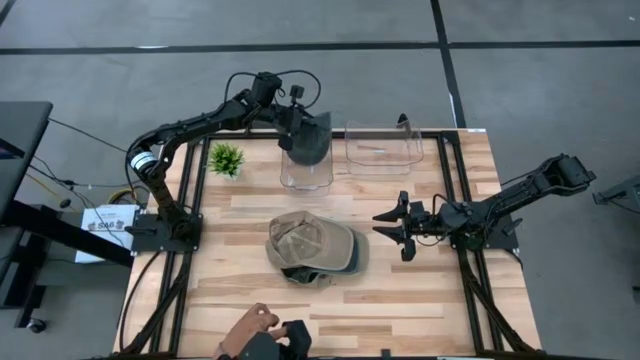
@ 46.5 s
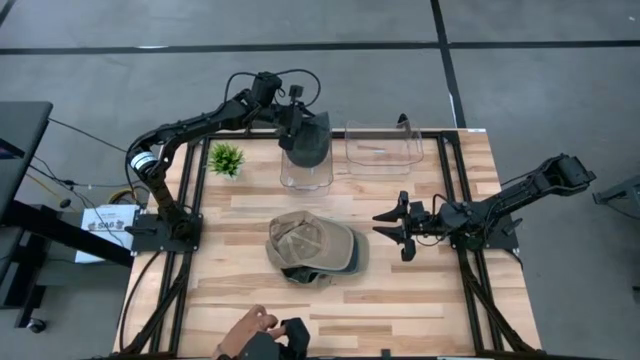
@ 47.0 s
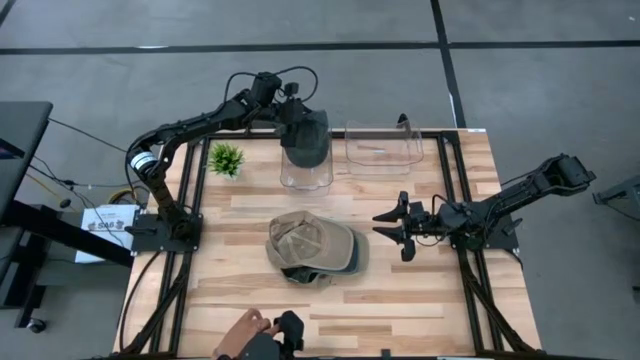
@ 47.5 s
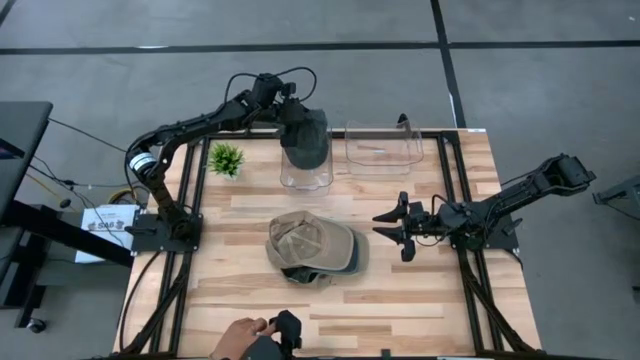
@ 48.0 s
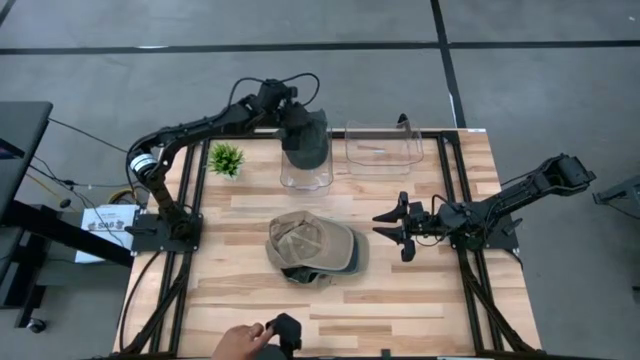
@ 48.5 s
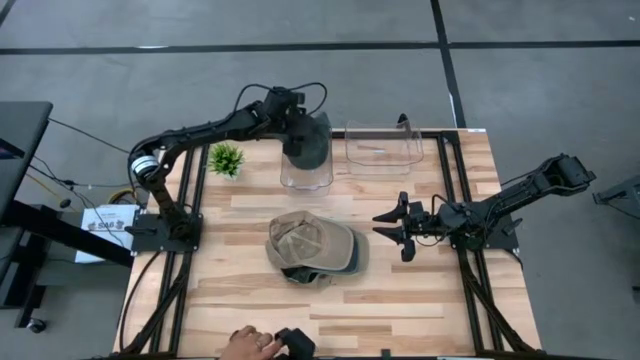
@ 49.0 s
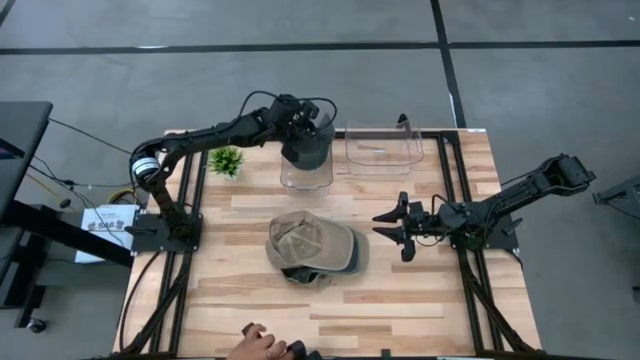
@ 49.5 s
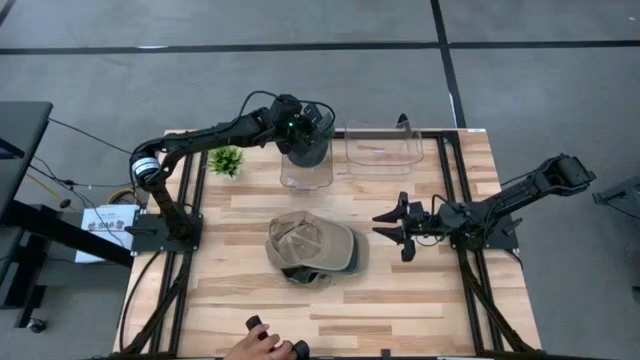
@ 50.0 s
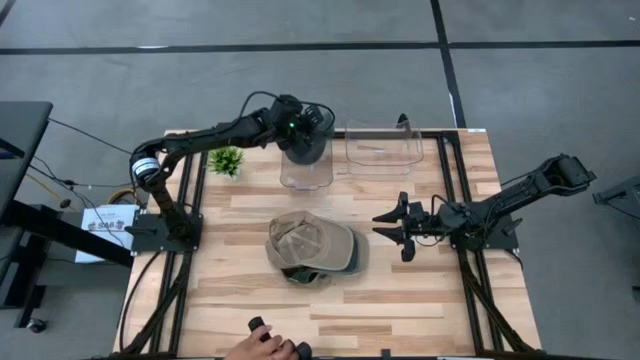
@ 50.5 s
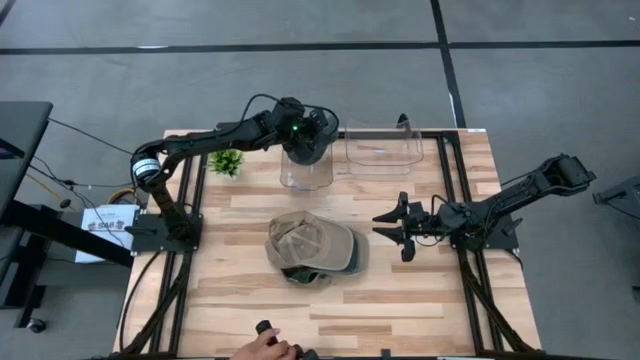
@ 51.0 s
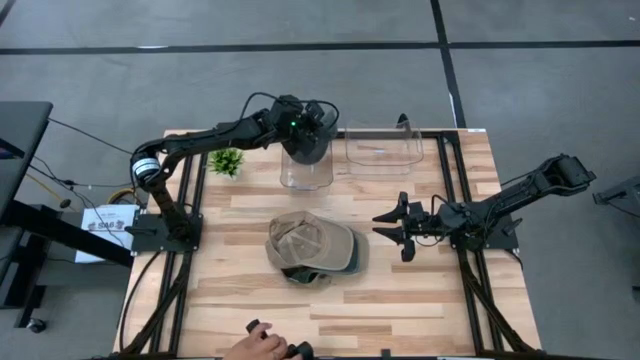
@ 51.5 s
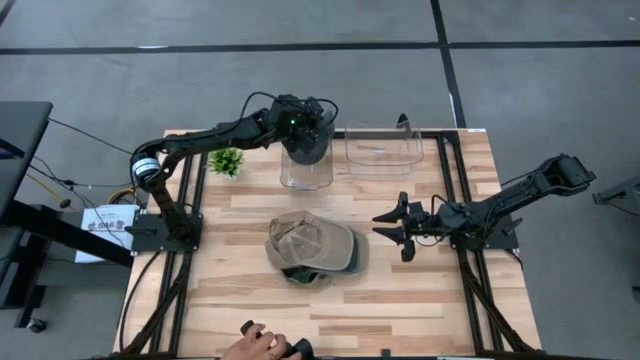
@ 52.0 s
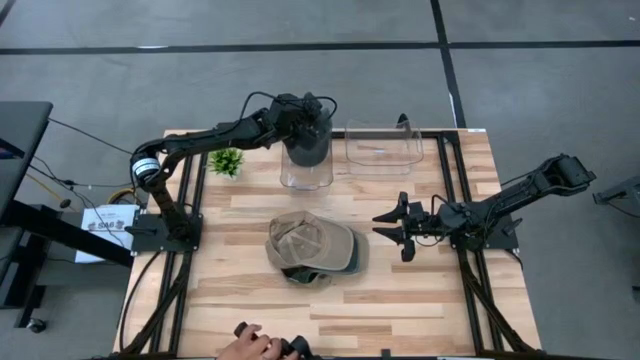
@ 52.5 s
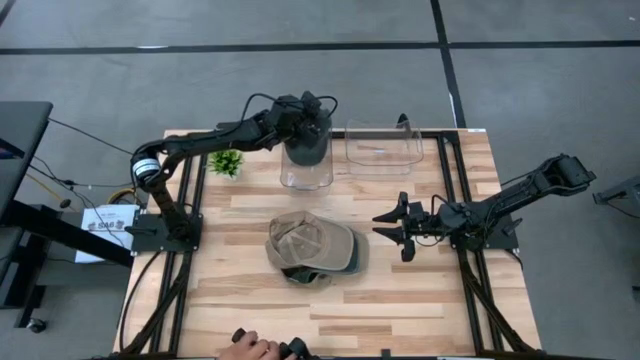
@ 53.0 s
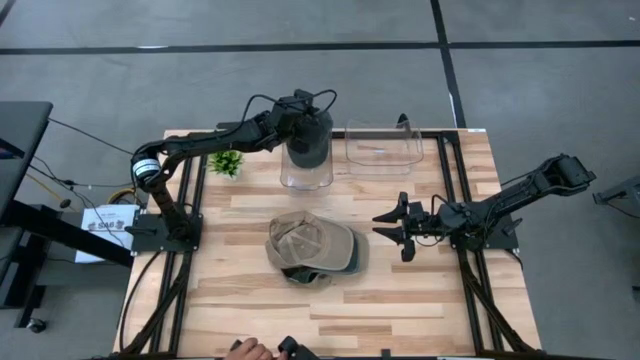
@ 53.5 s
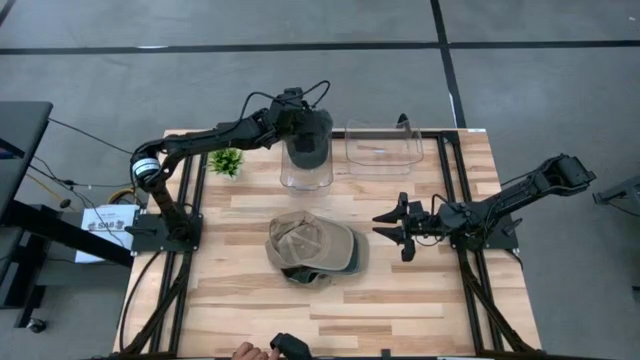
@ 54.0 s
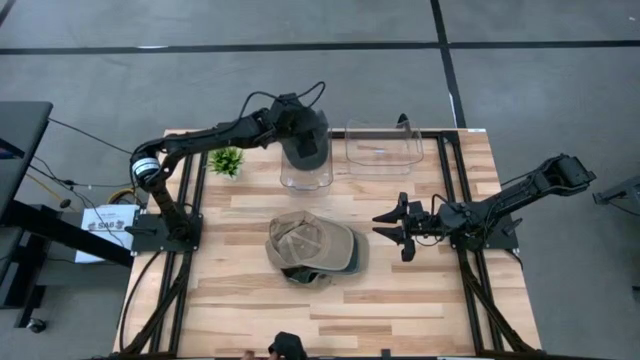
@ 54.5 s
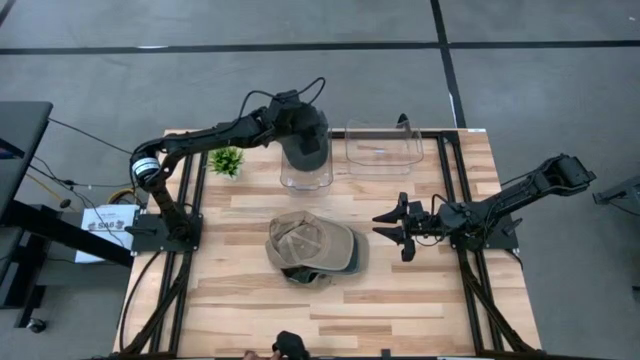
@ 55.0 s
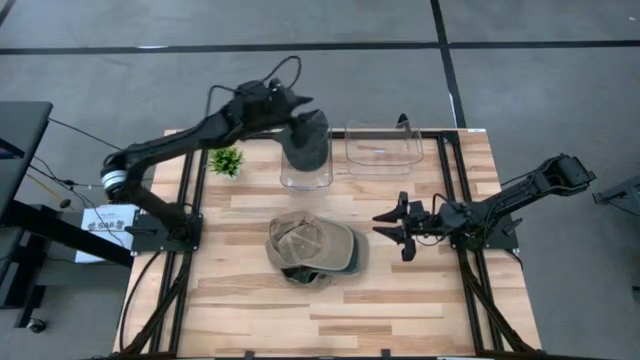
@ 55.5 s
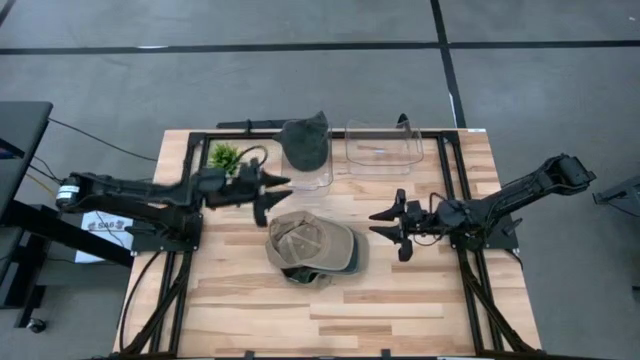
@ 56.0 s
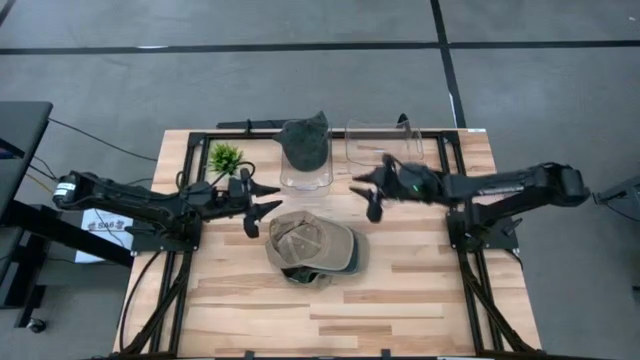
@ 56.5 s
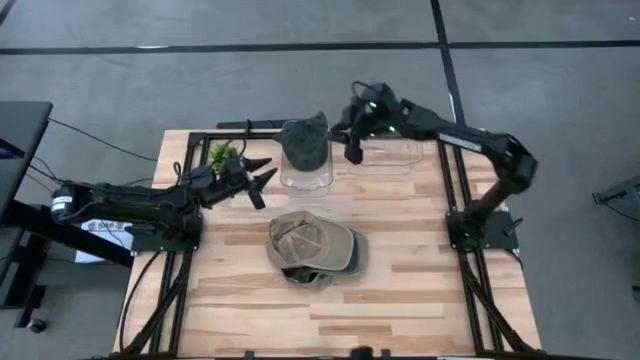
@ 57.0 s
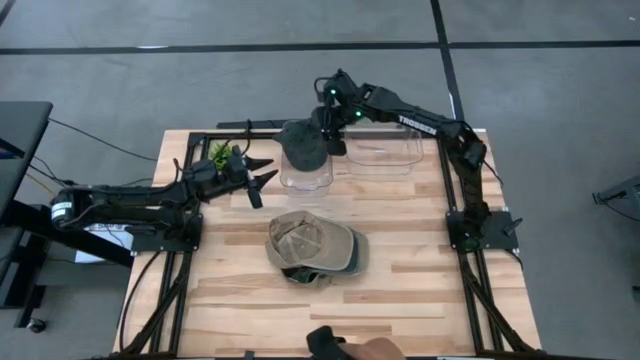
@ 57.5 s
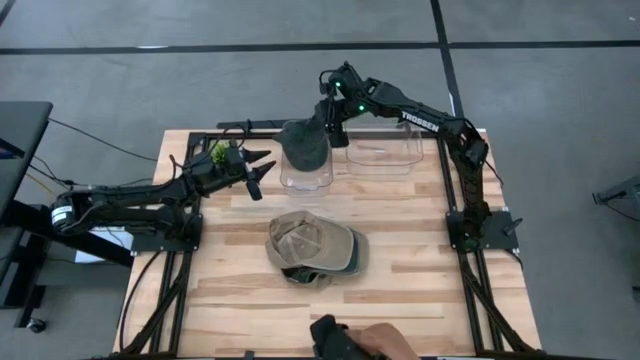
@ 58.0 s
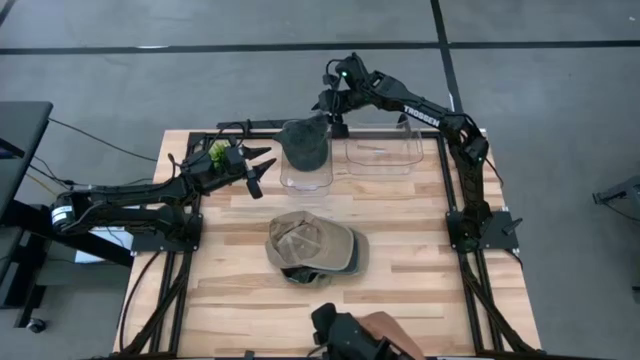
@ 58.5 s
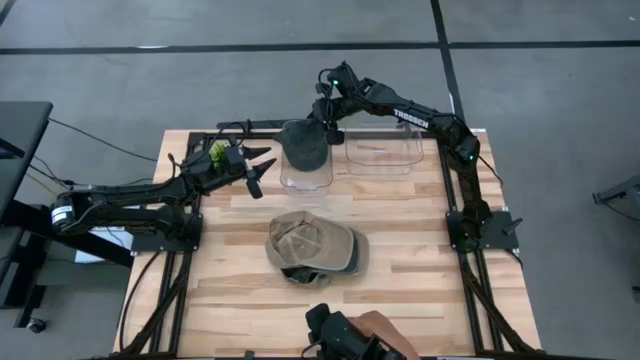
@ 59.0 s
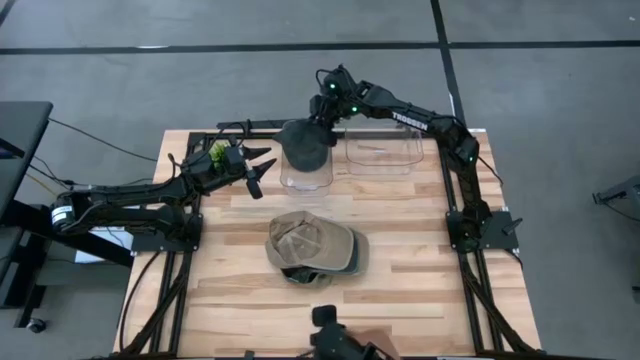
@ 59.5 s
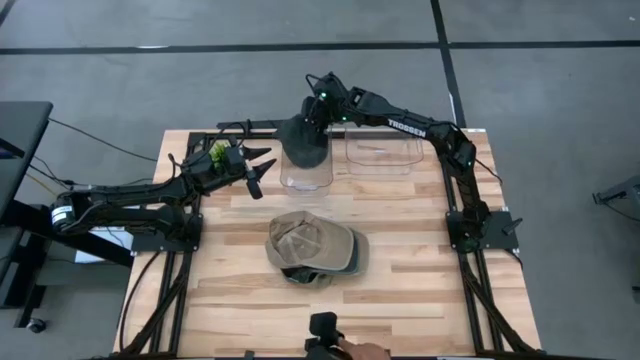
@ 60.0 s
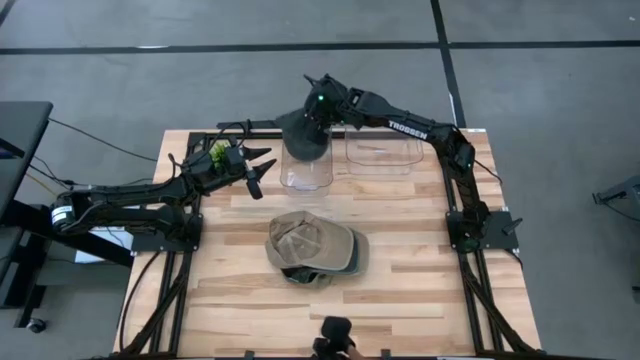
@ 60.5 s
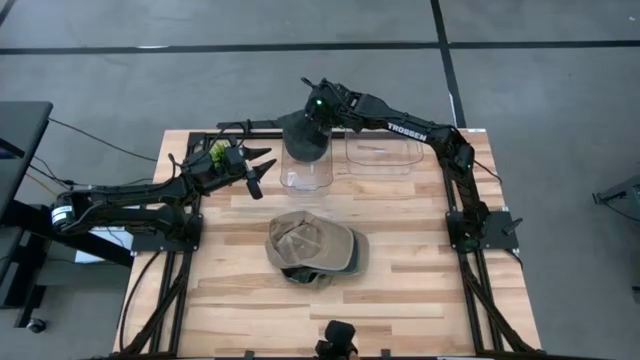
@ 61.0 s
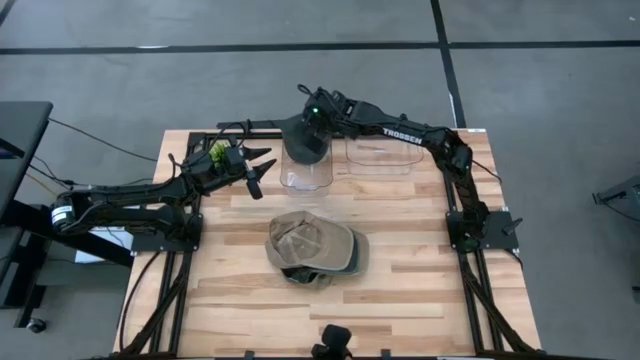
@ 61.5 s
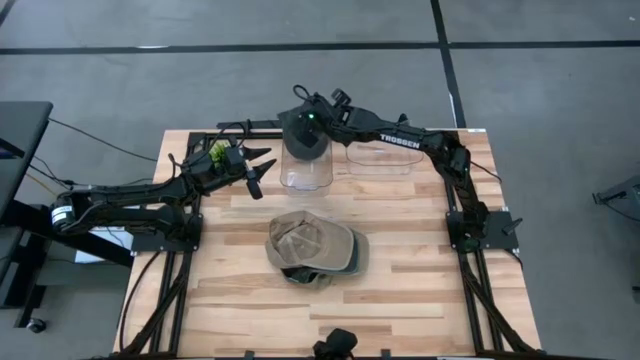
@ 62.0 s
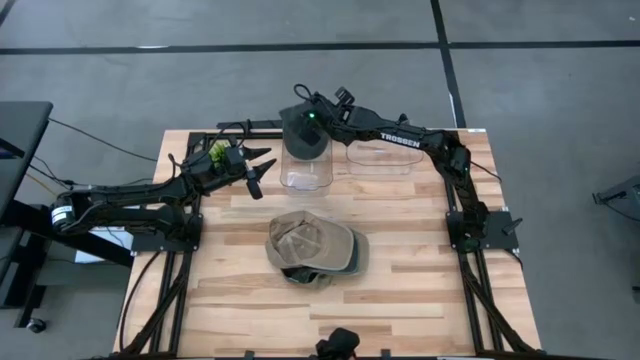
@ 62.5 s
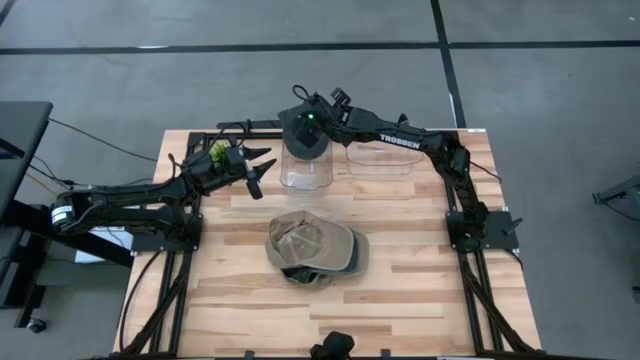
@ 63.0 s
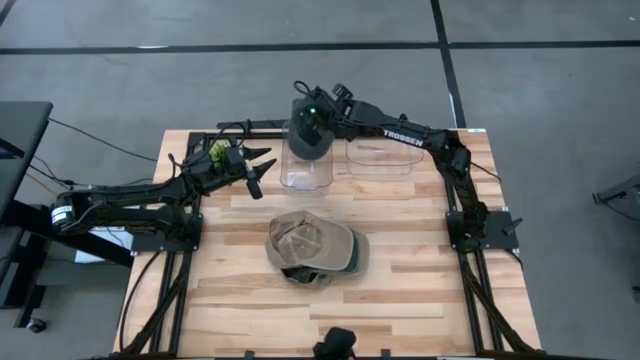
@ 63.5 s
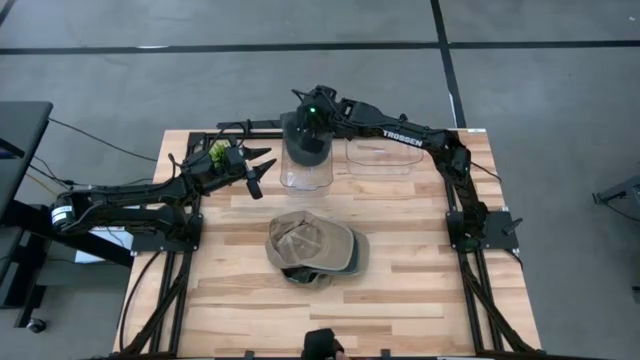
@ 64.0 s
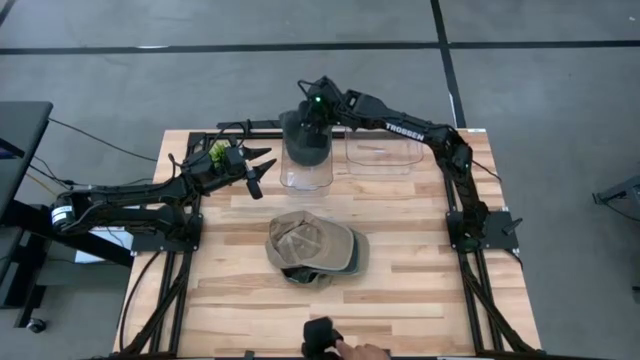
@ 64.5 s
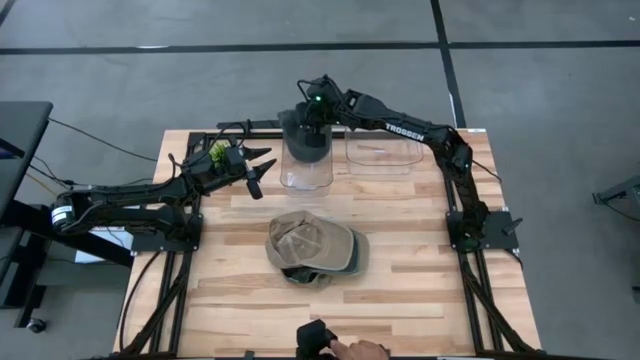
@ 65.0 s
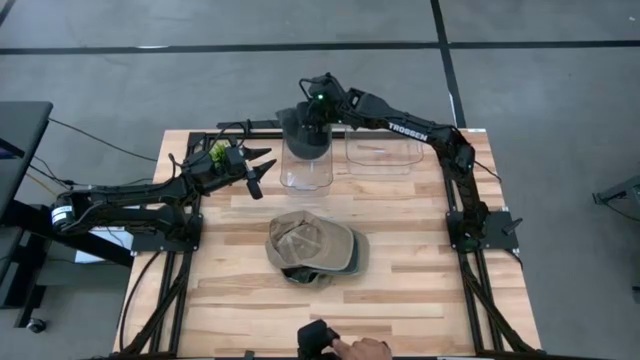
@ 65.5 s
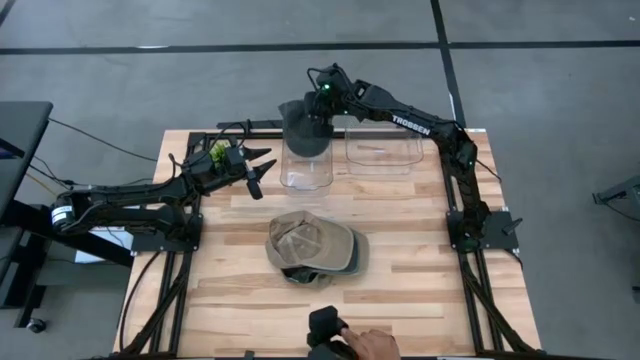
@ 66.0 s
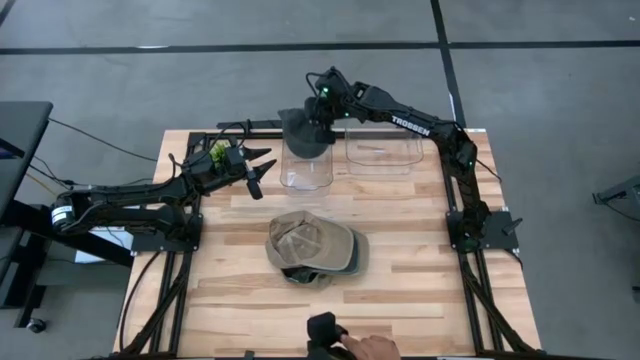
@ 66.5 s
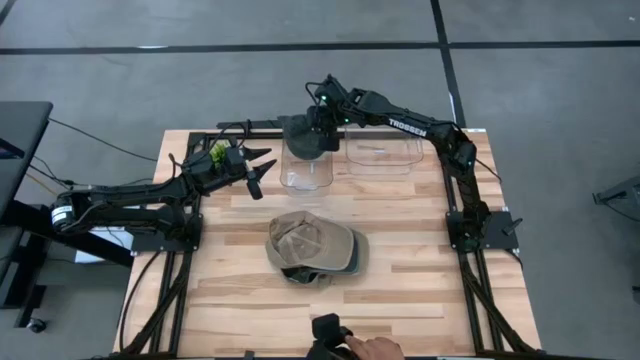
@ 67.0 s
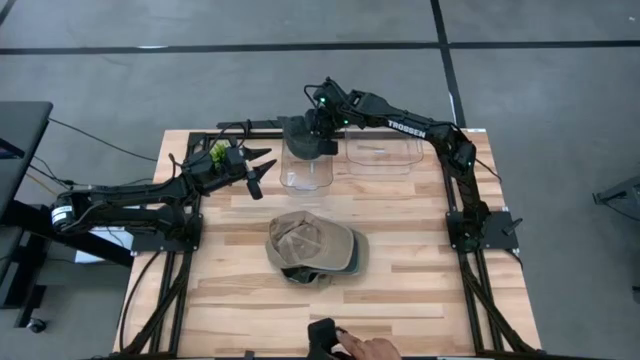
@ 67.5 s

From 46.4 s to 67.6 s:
Task: Pick & Place hat
Put the black cap into the left transparent bin
